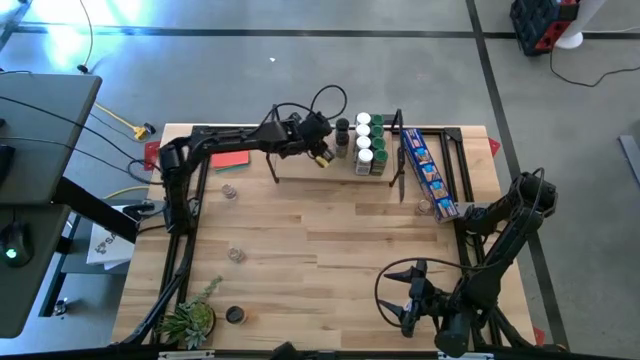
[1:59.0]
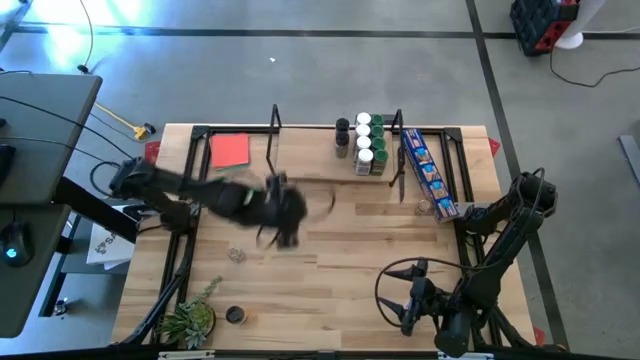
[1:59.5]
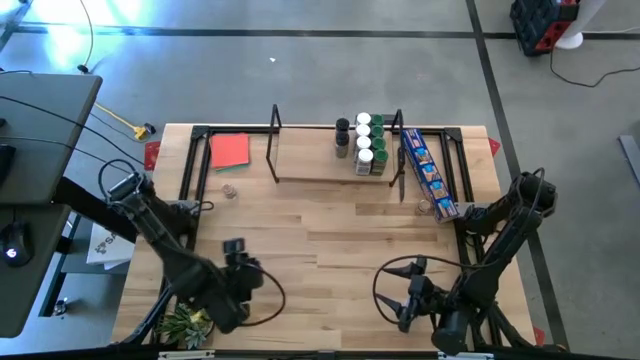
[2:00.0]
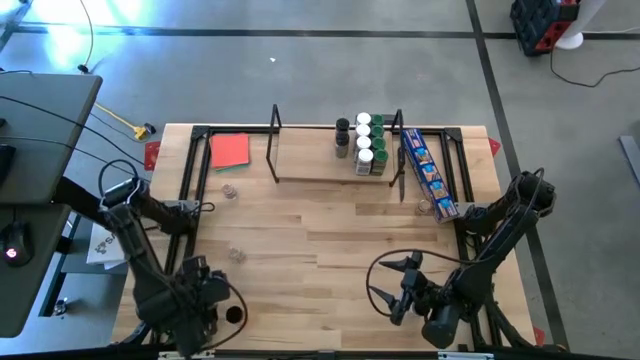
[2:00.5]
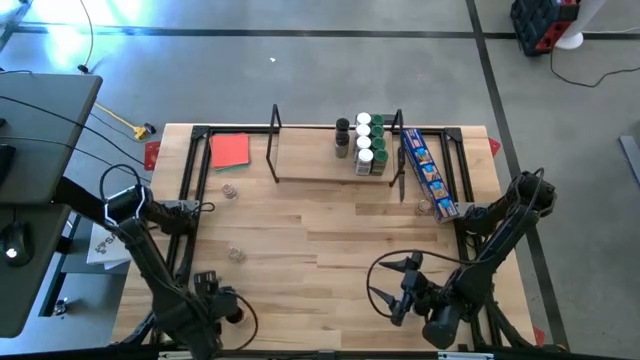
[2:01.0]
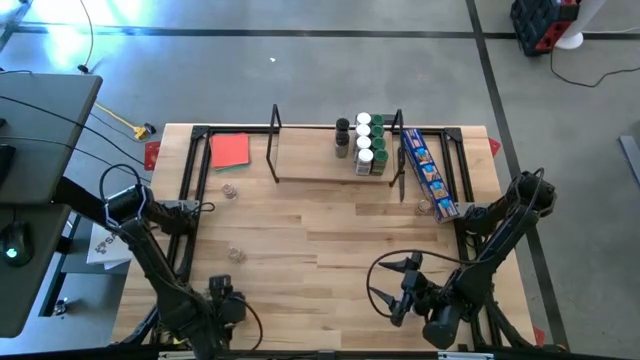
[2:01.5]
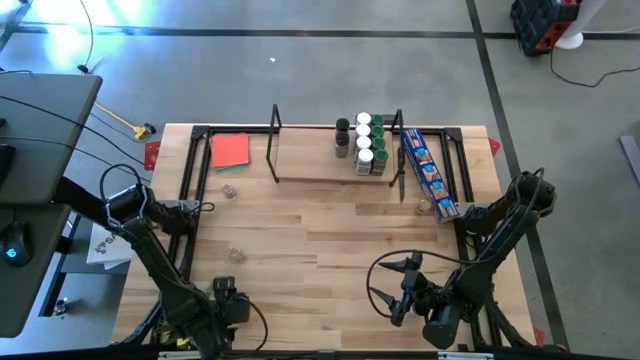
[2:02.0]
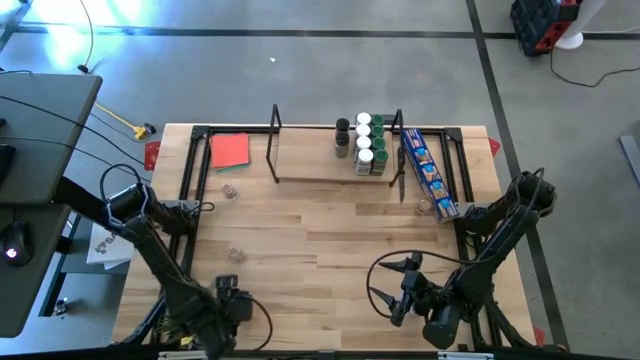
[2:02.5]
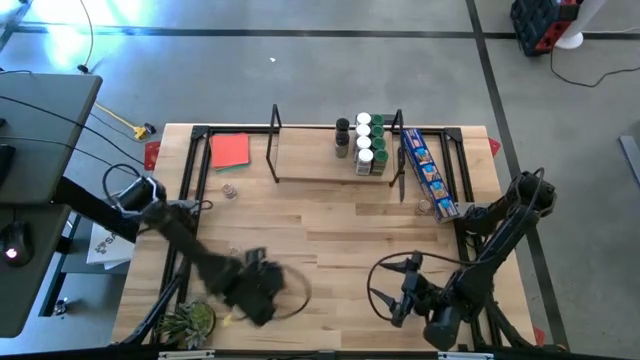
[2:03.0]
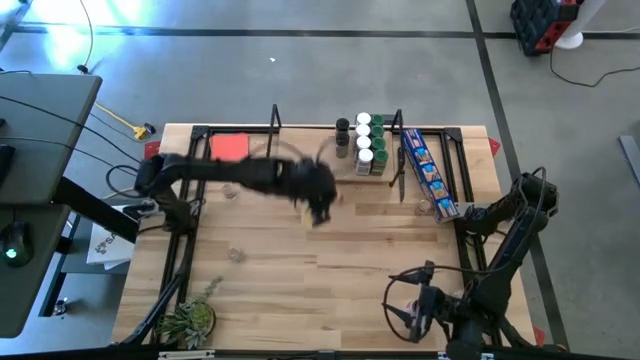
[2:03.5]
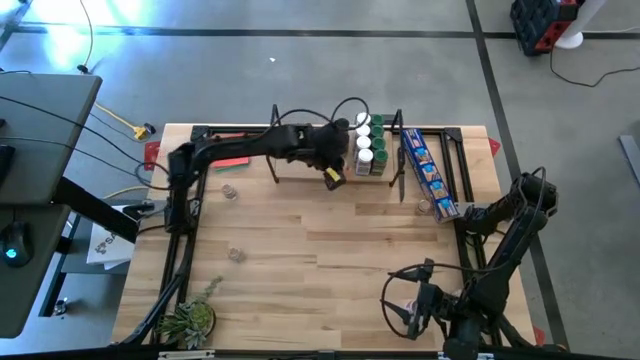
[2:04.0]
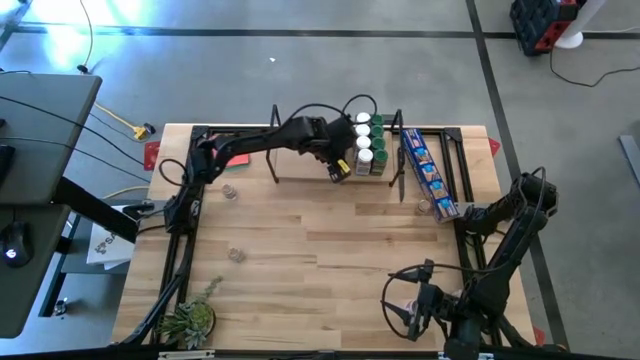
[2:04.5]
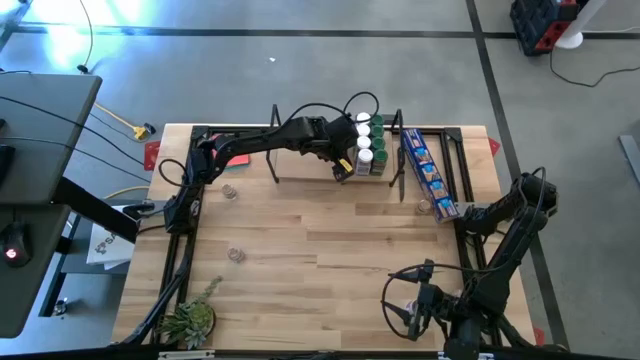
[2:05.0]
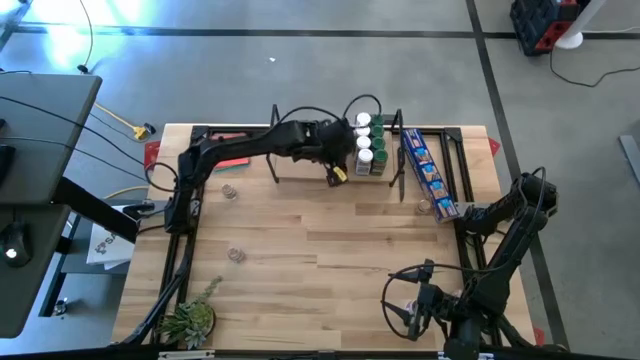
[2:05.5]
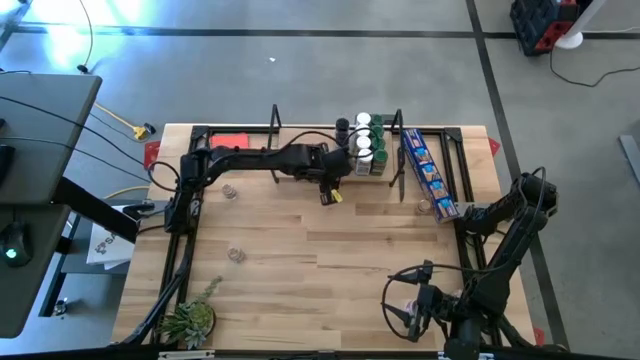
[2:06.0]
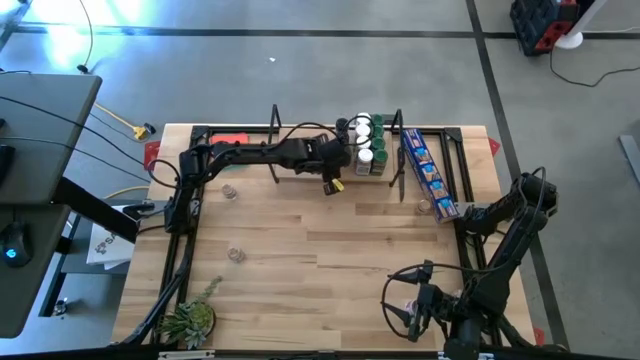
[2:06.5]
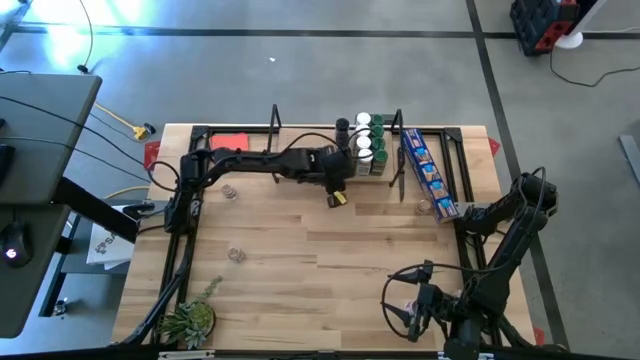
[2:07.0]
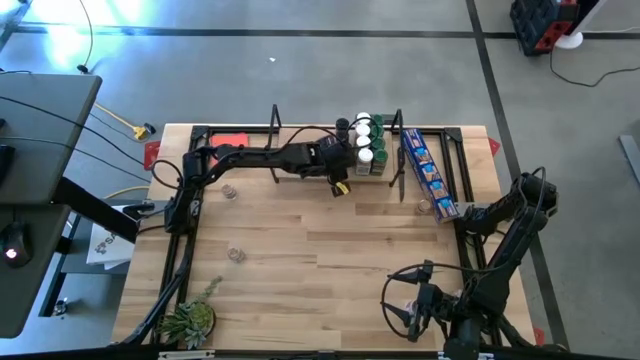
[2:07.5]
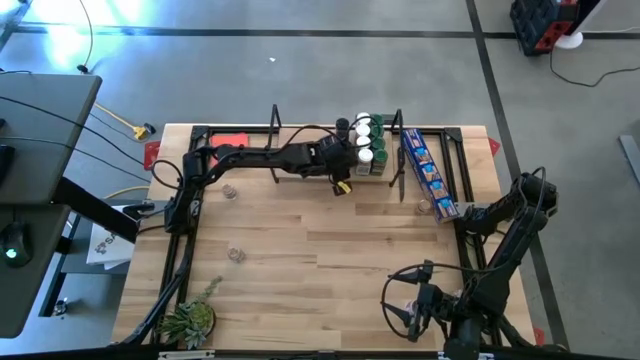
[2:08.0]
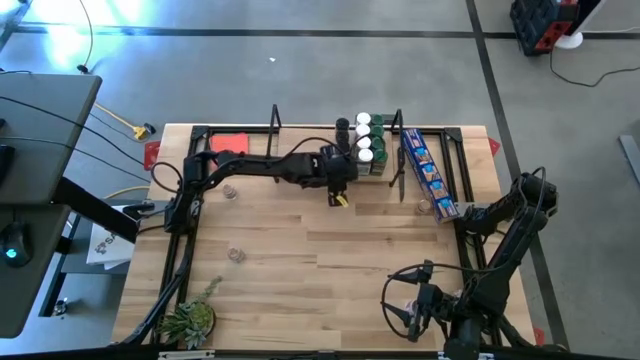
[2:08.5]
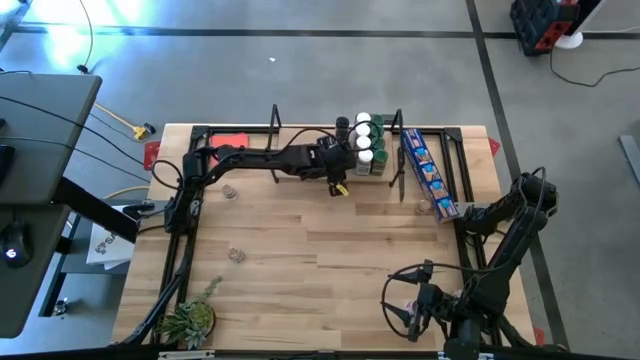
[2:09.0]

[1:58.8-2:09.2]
Task: Shelf spices
Put the left black seasoning bottle on the shelf aligned with the other black seasoning bottles

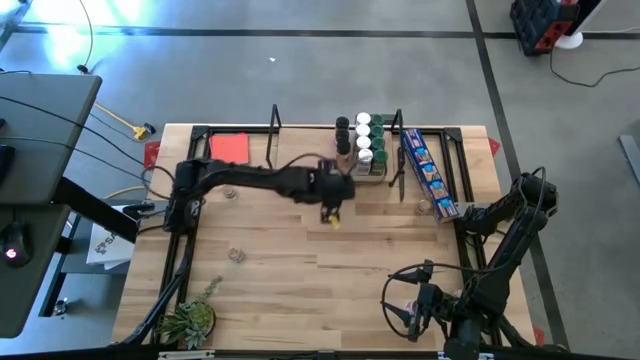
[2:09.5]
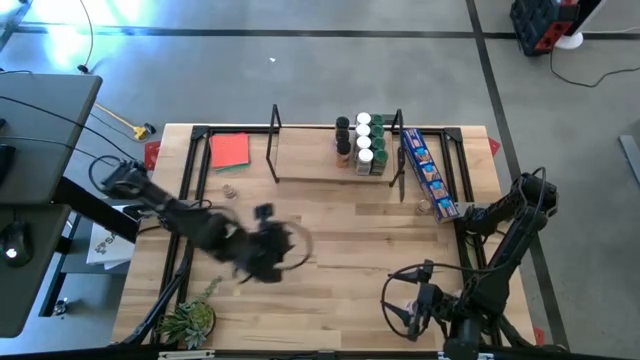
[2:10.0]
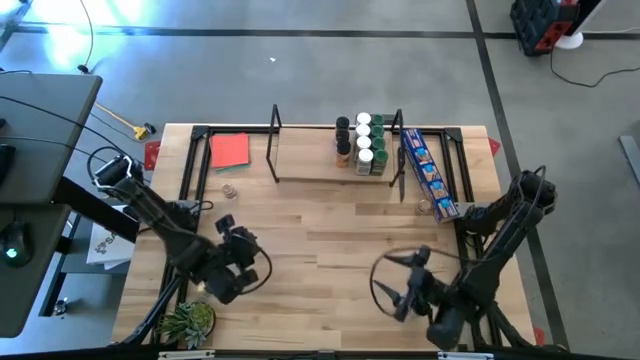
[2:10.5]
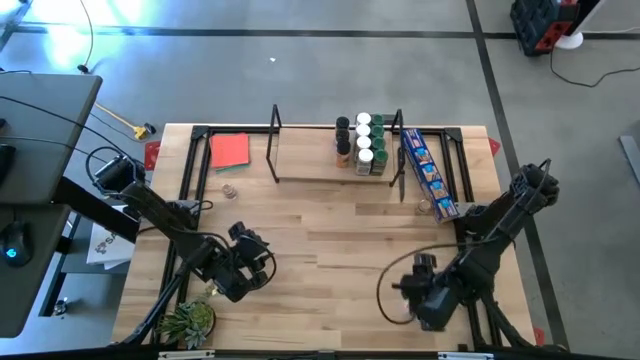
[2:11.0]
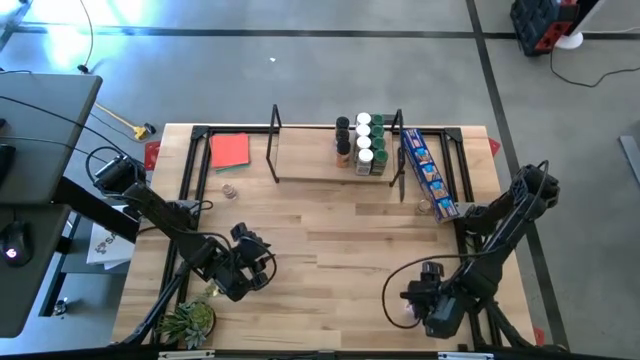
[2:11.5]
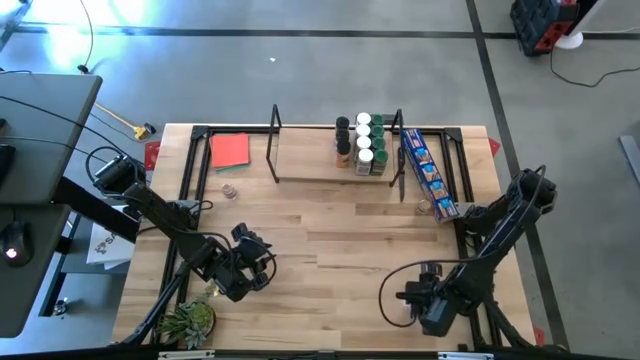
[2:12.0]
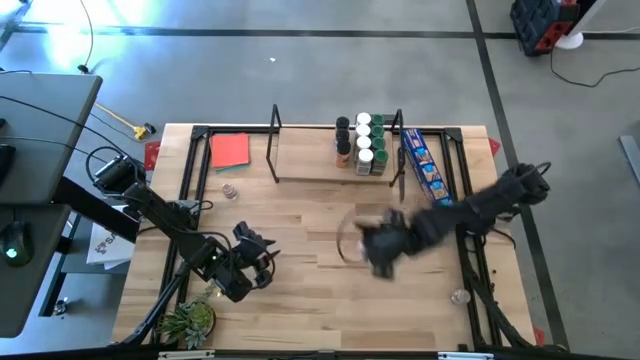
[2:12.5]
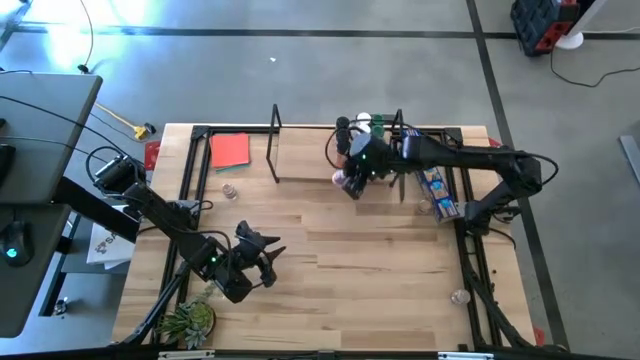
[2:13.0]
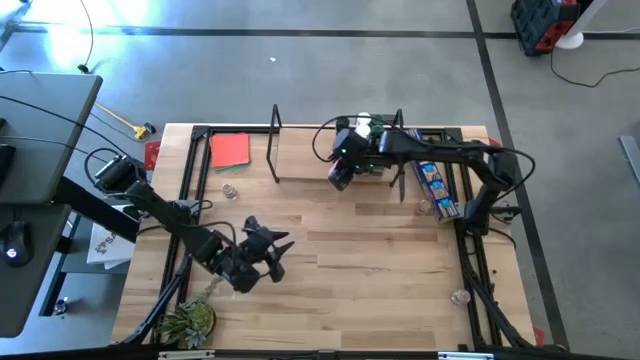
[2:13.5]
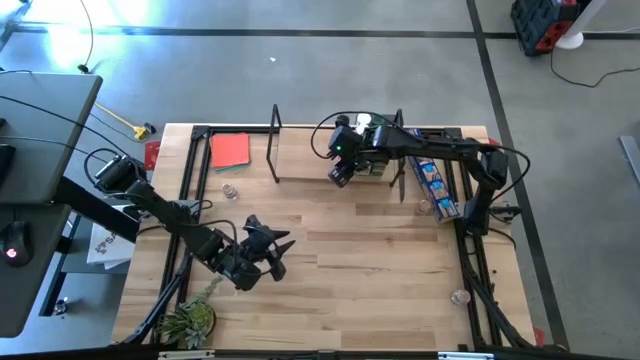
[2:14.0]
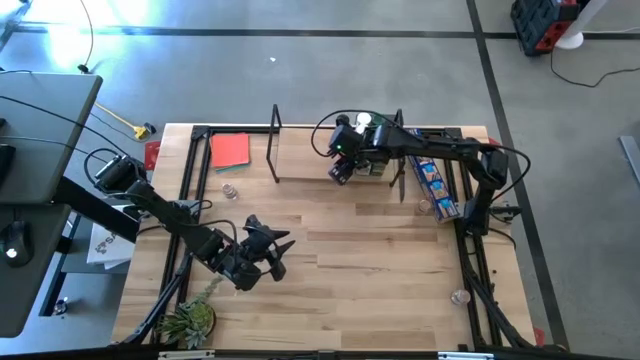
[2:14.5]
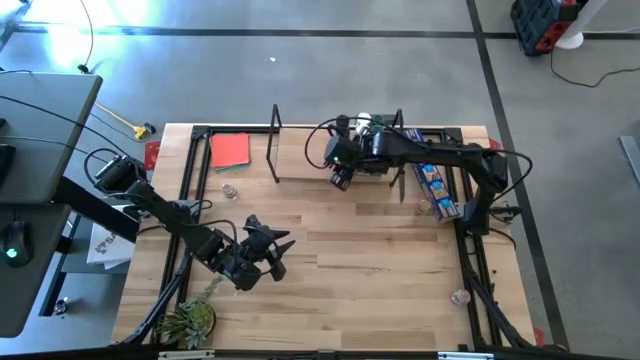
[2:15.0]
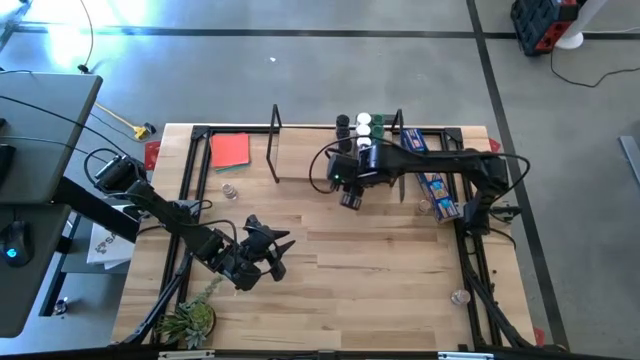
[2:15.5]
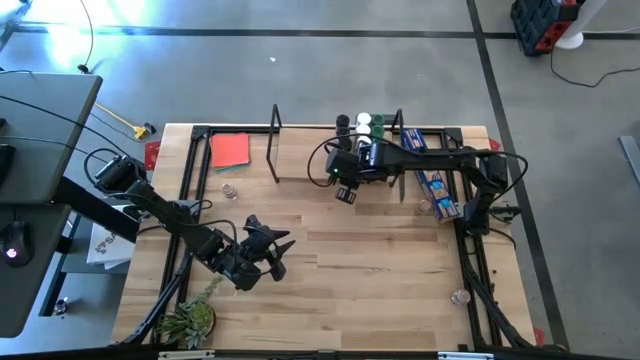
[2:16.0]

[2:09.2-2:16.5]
Put the black seasoning bottle on the shelf aligned with other black seasoning bottles

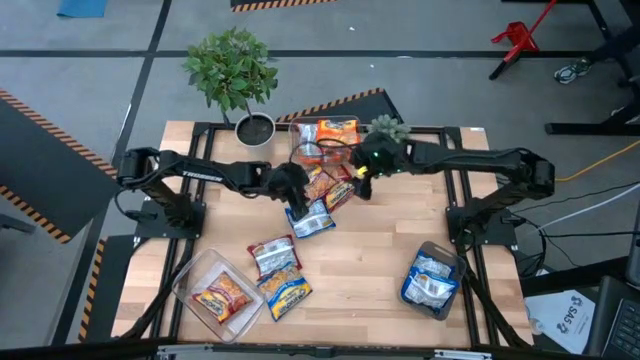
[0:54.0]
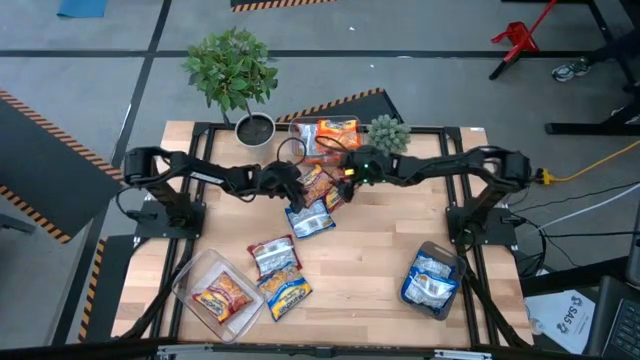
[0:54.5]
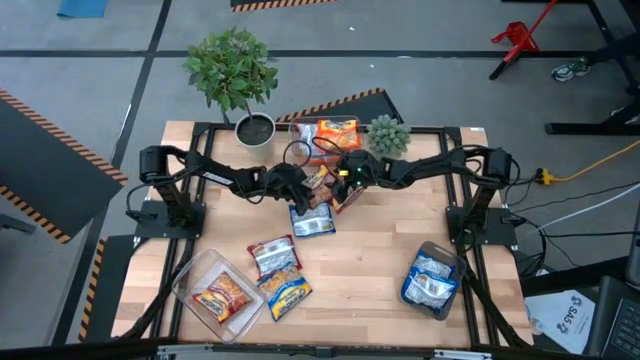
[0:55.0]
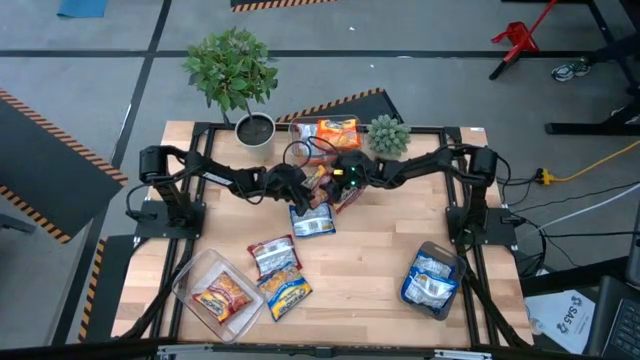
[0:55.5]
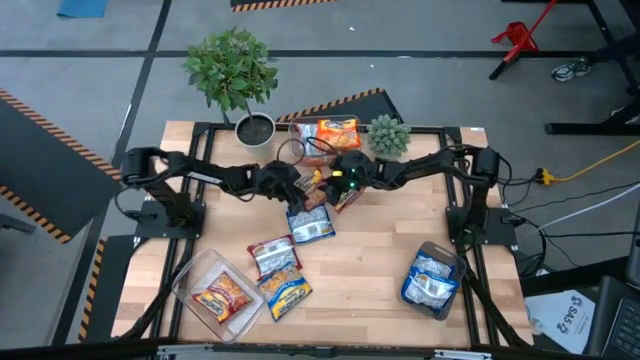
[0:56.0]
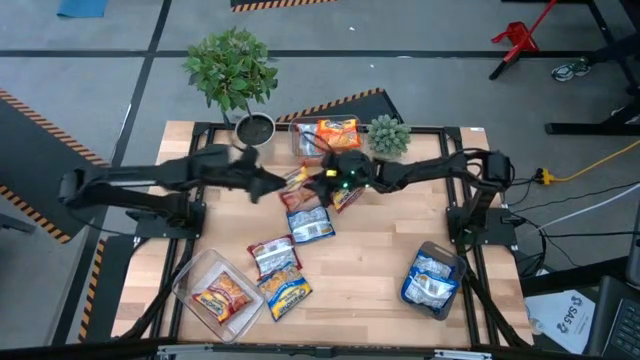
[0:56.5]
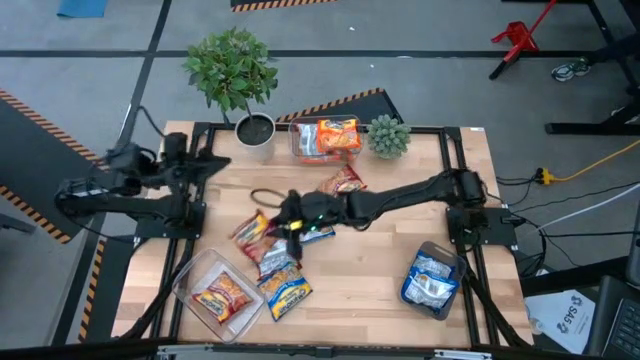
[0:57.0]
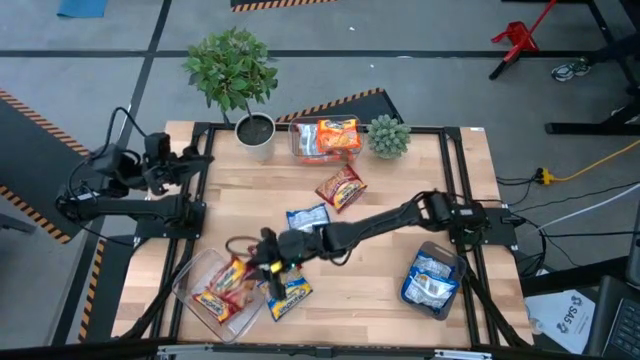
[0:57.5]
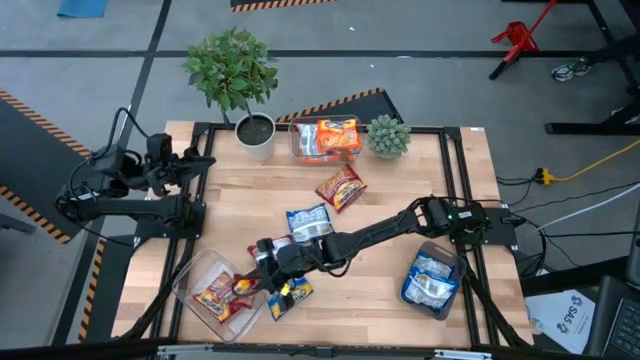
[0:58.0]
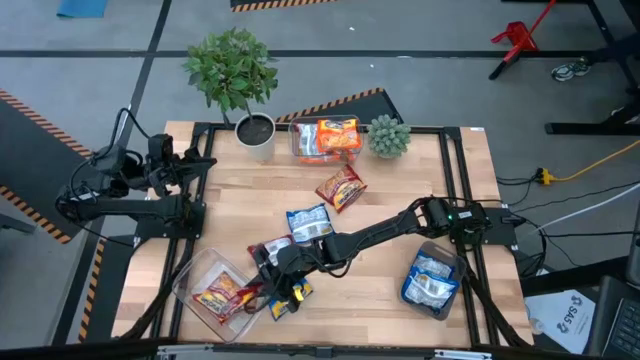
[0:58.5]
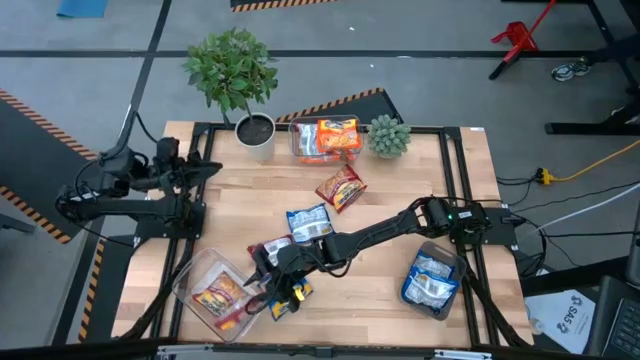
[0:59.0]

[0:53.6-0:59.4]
Task: Sort Maruchan noodles
Put the red noodle pack into the bottom transparent bin
